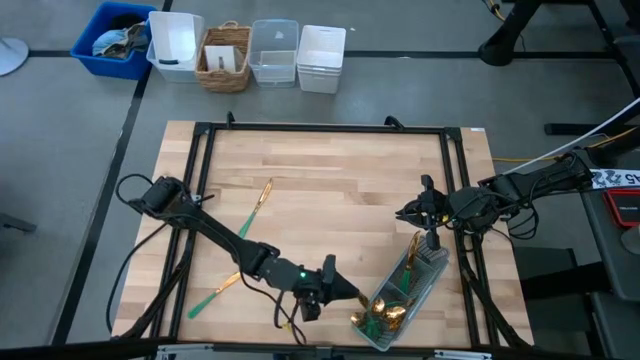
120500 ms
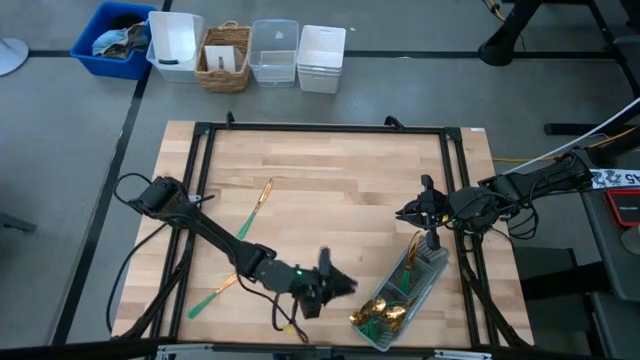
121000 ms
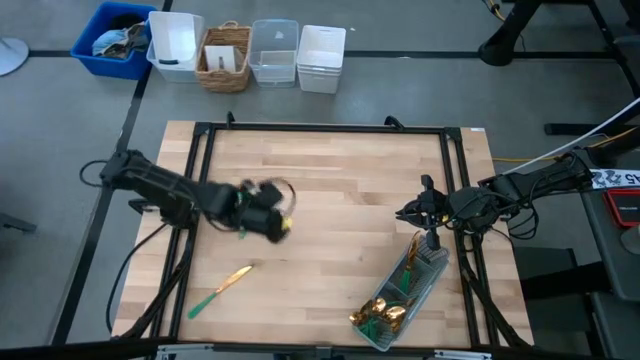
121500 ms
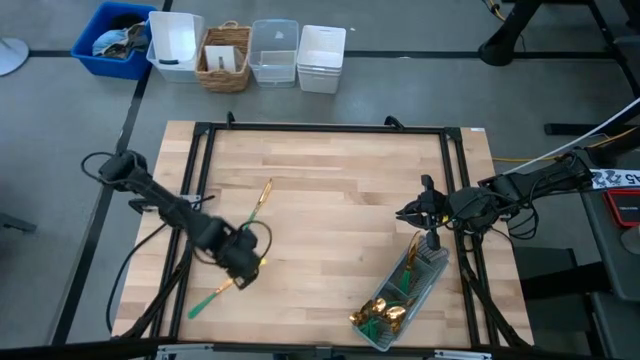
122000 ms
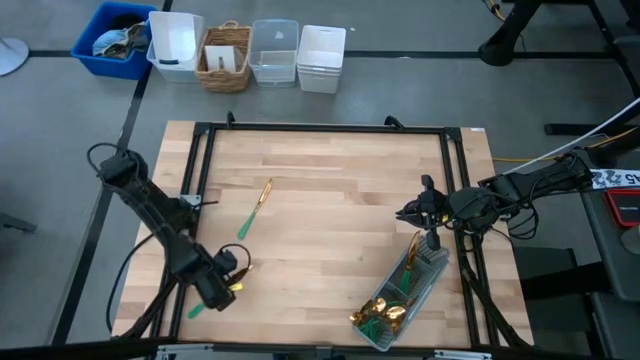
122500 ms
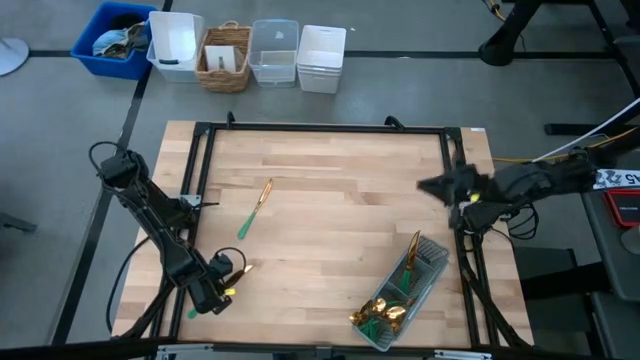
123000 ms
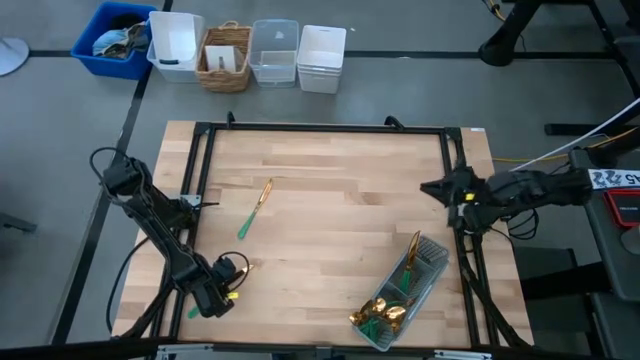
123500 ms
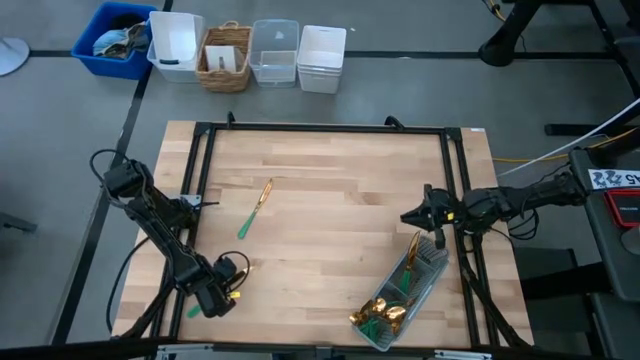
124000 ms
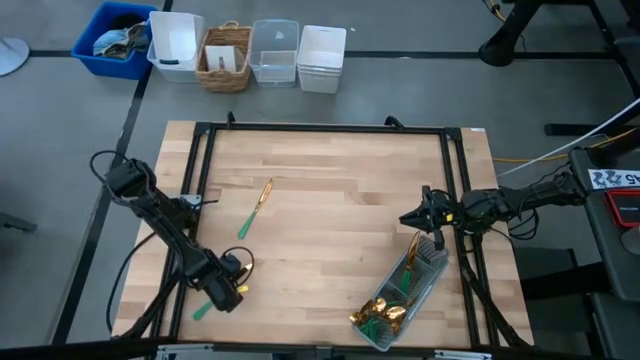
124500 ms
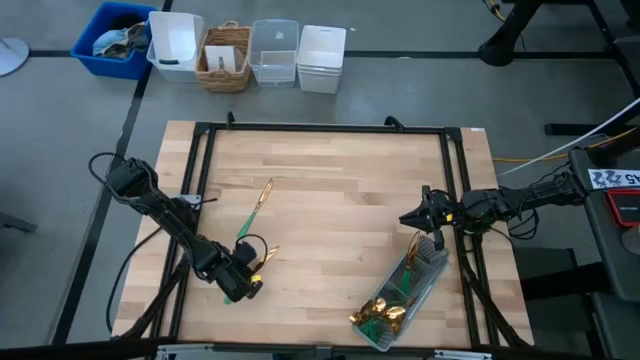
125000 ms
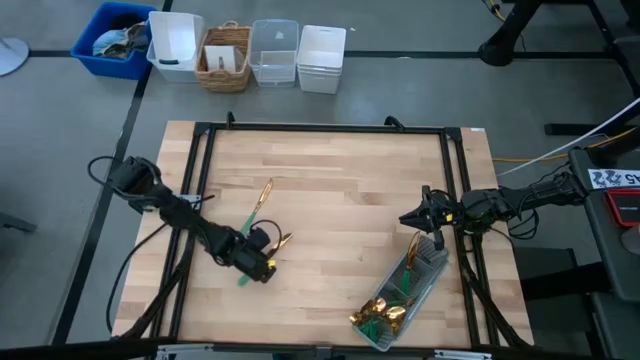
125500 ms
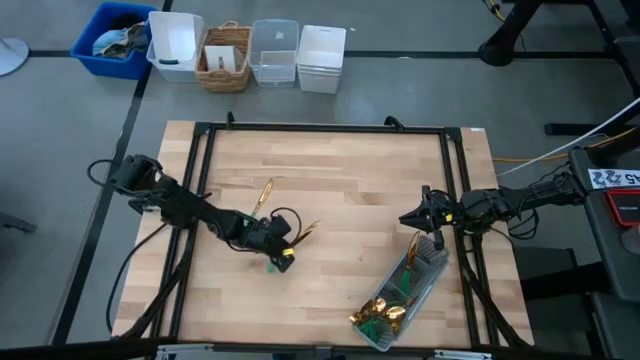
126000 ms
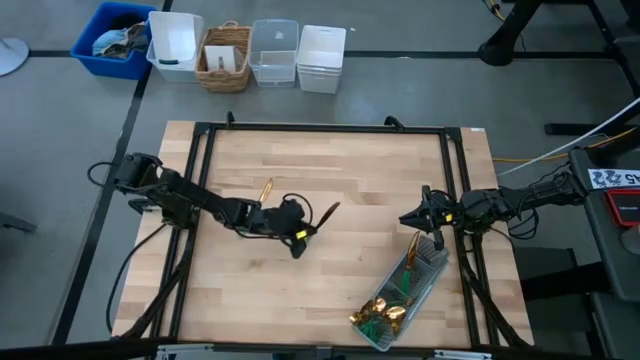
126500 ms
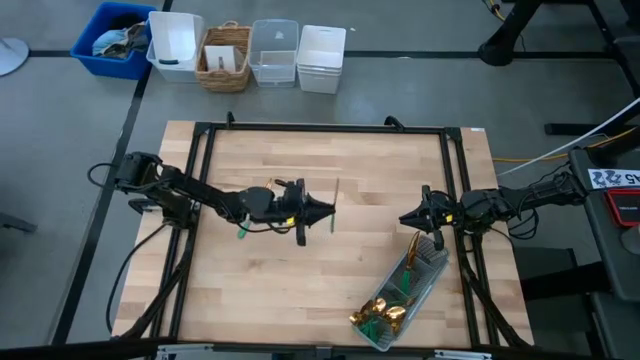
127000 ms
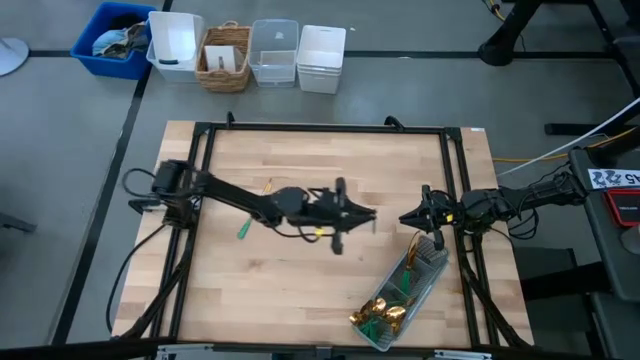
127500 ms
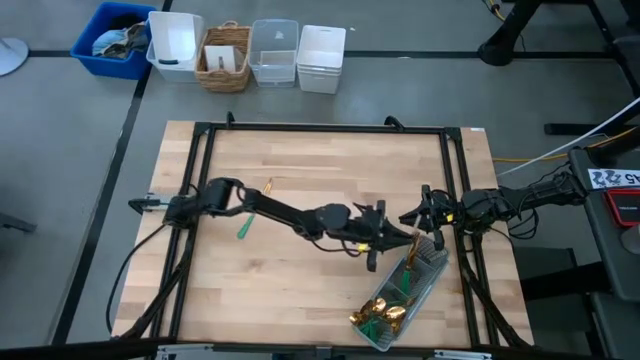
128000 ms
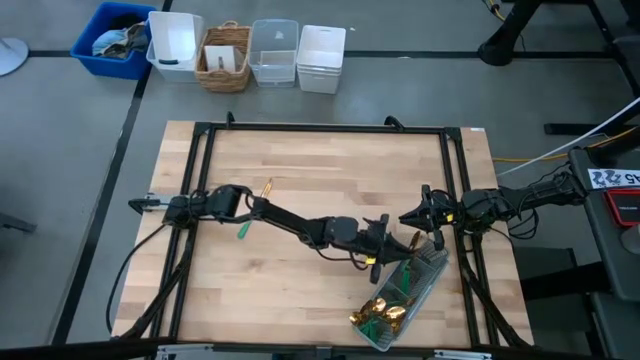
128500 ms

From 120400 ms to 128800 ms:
Task: Sort silverware
Put the bottom table knife into the utensil organizer

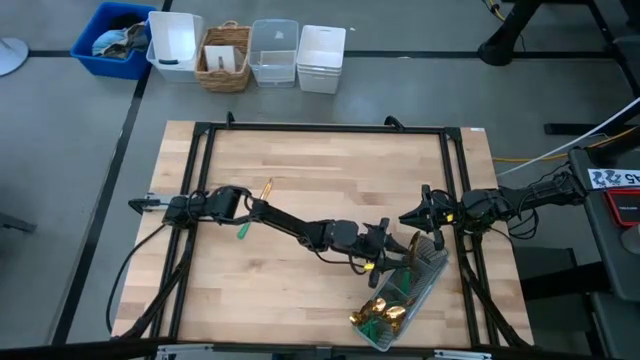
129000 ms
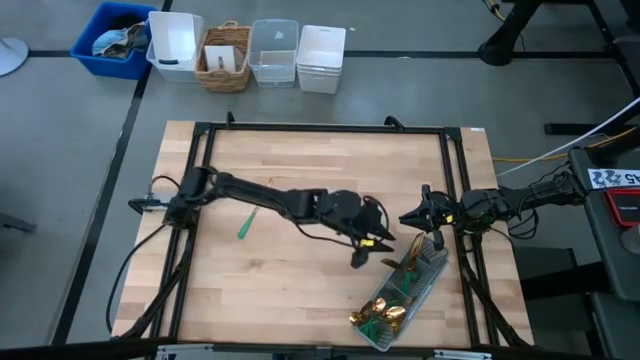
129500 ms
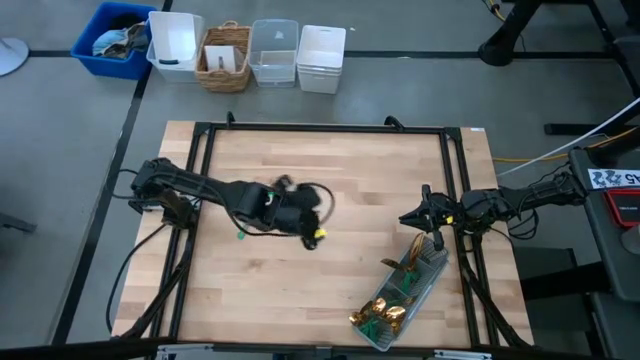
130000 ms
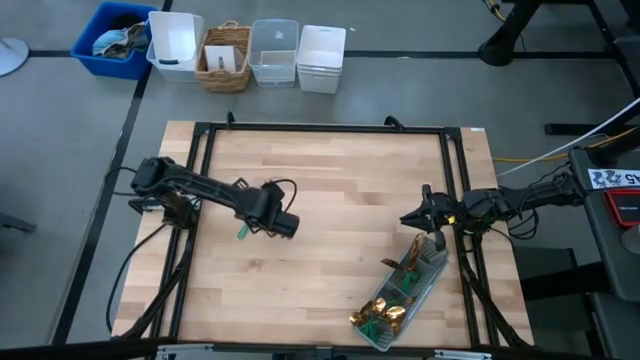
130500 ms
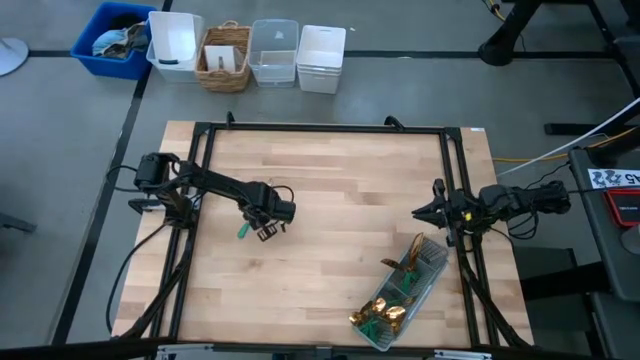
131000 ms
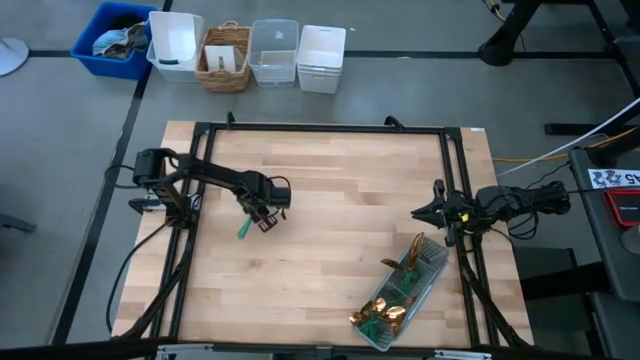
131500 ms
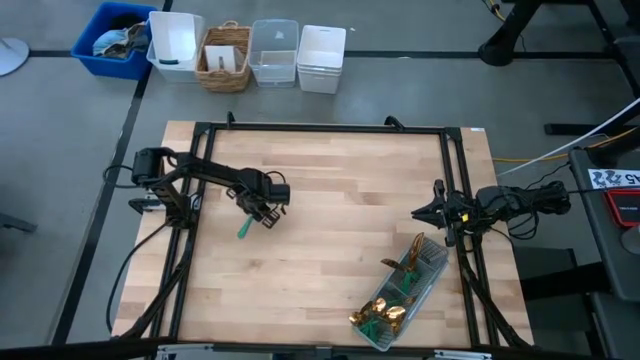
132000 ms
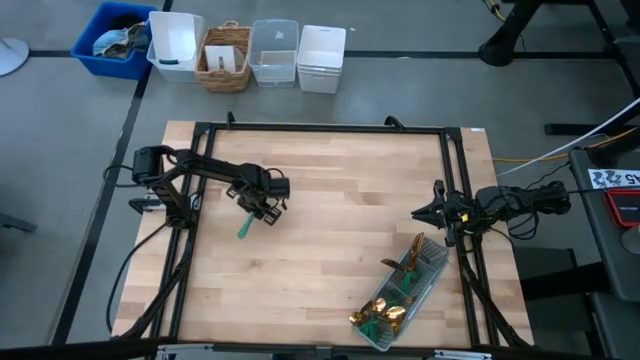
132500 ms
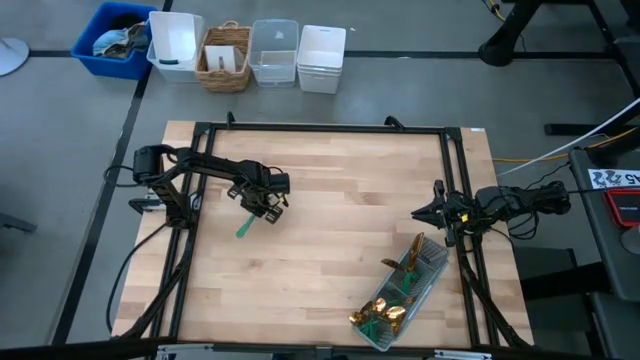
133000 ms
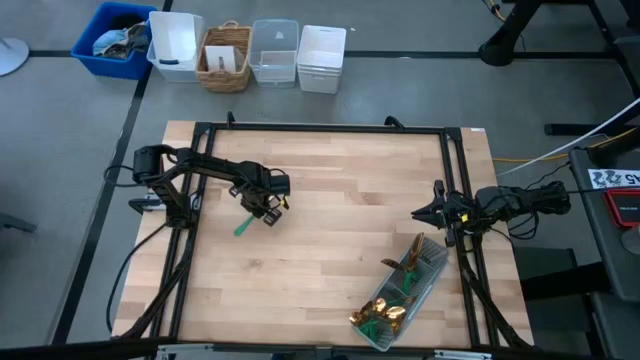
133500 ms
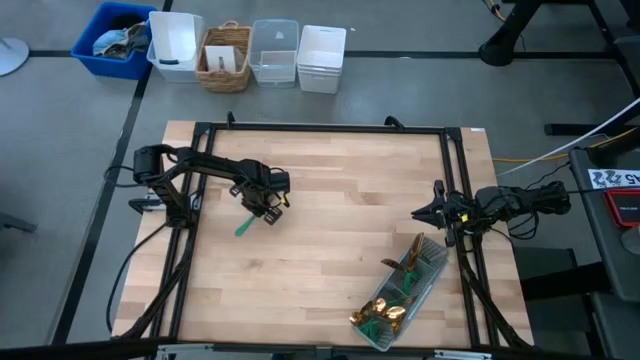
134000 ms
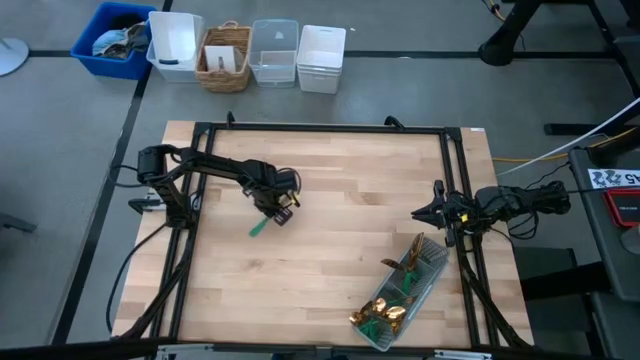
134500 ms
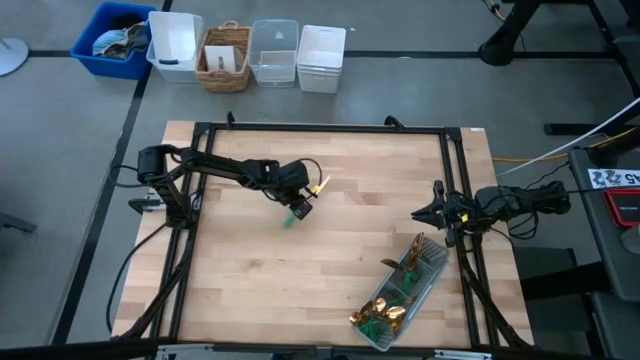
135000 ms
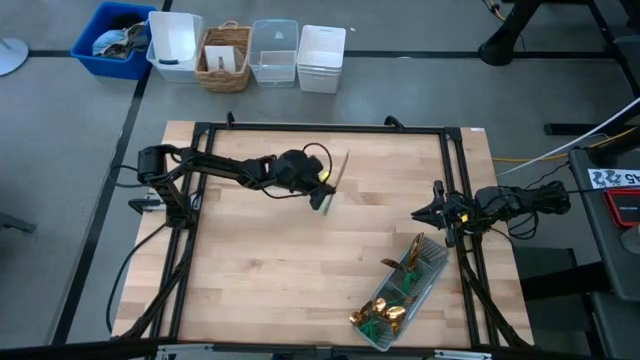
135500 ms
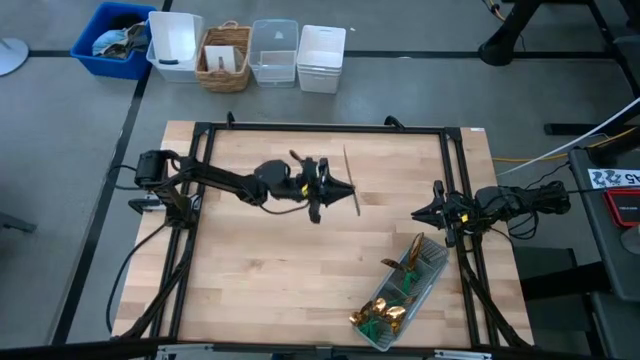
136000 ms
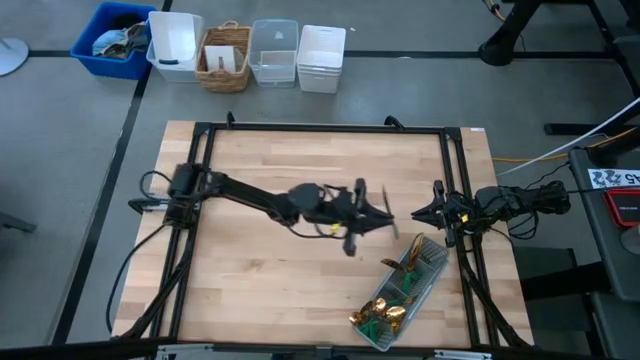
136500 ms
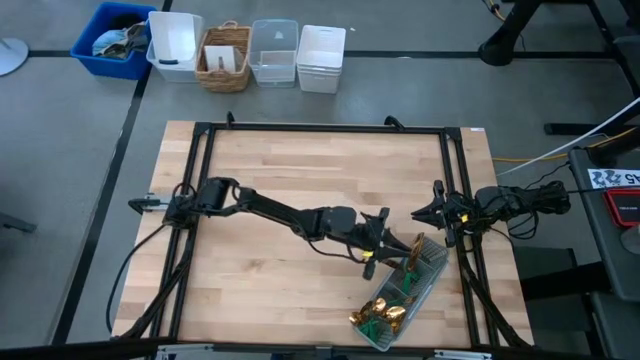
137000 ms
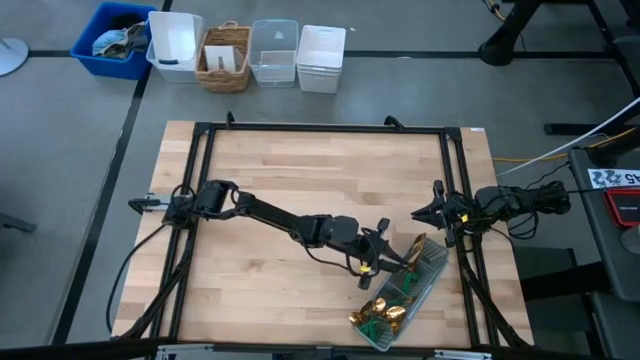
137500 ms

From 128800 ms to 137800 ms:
Put the table knife into the utensil organizer

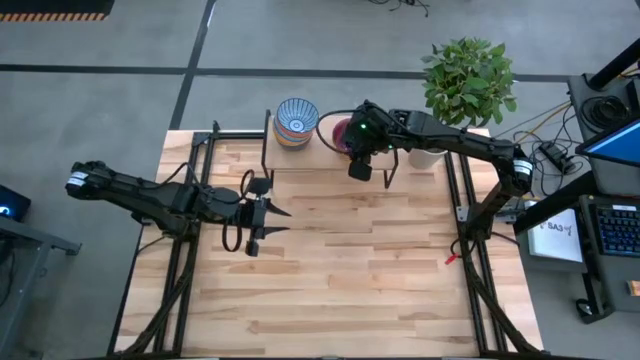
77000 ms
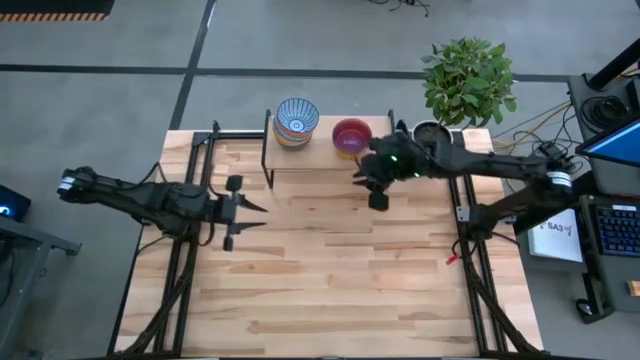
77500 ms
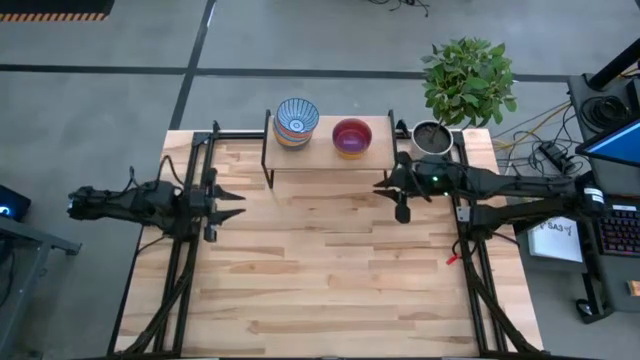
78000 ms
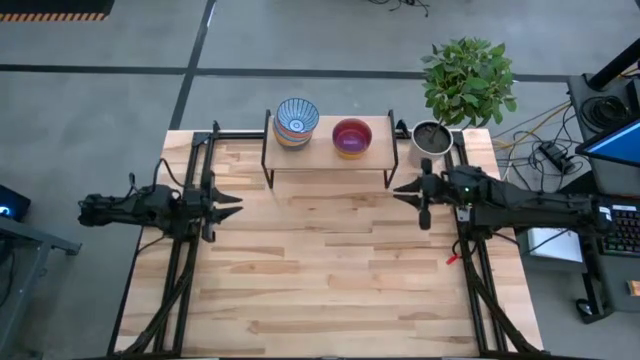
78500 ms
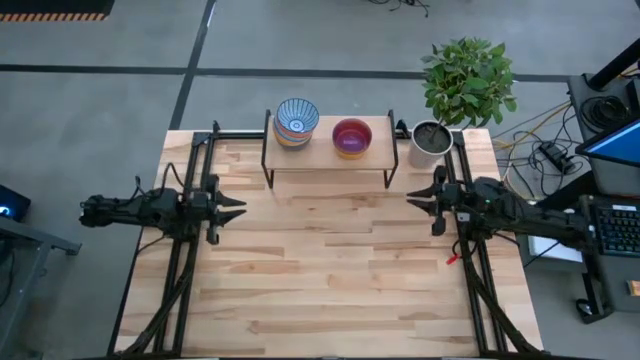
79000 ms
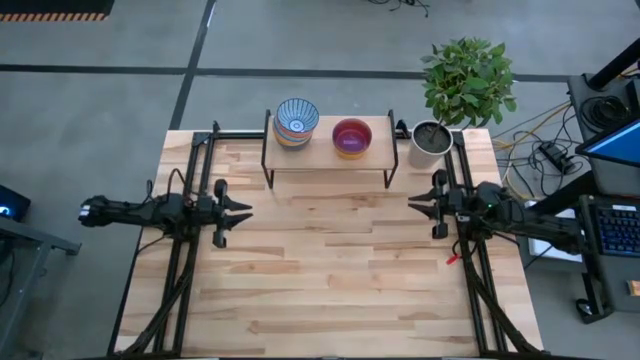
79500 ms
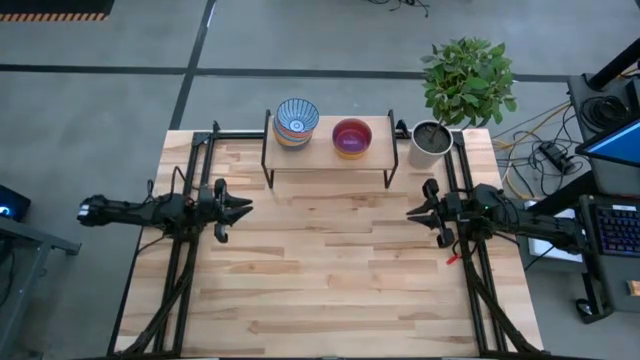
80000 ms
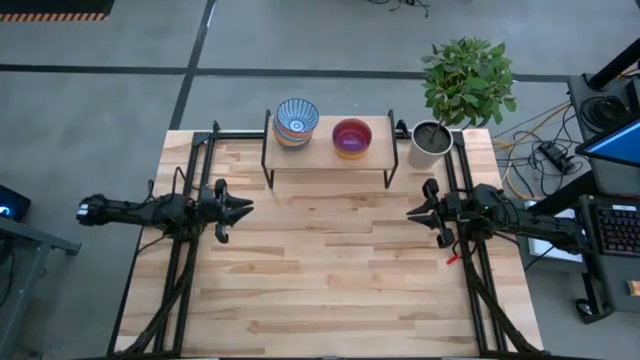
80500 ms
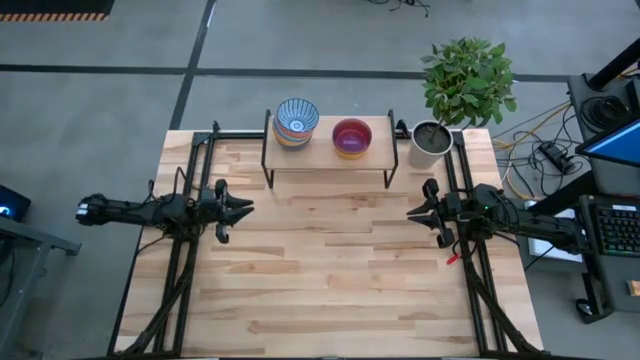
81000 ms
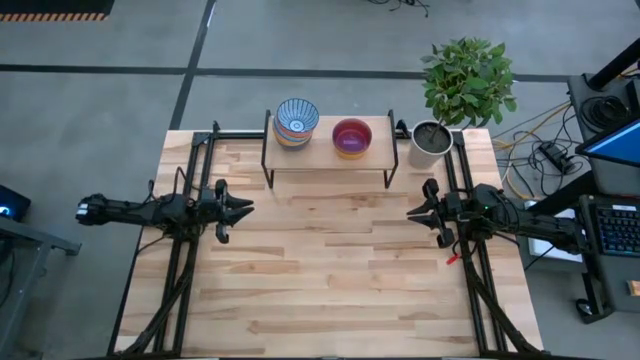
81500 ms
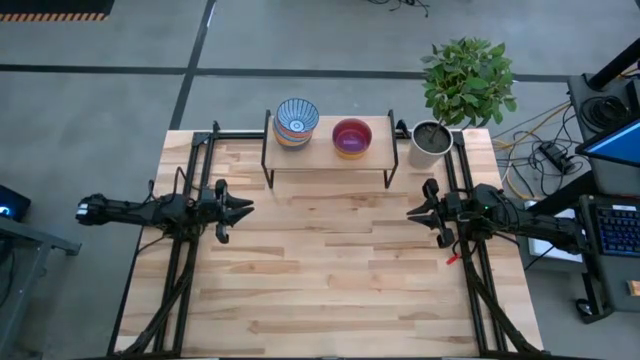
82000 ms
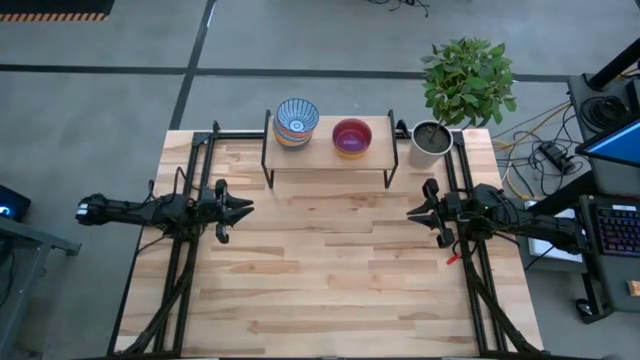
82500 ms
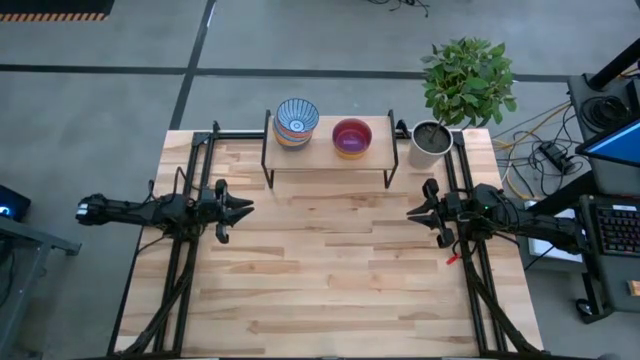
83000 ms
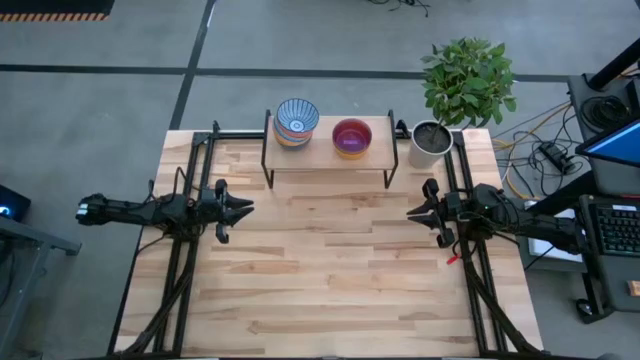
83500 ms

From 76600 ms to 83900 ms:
Task: Place and stack bowls onto a shelf
Return to Home Position
